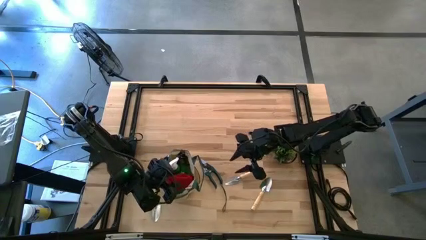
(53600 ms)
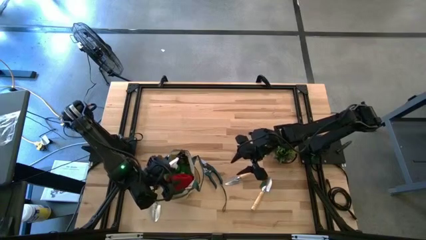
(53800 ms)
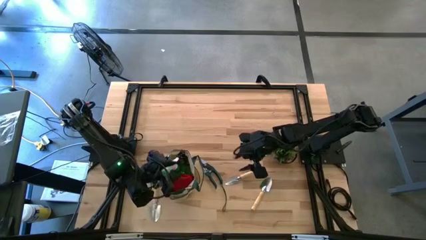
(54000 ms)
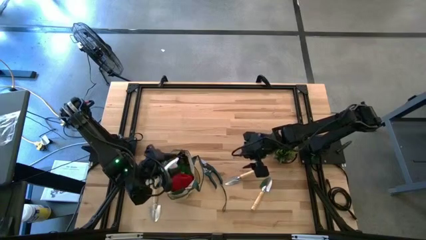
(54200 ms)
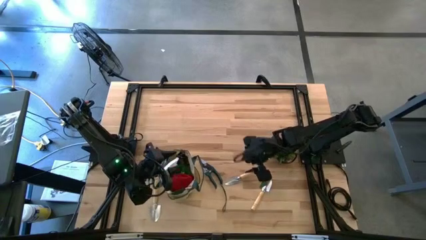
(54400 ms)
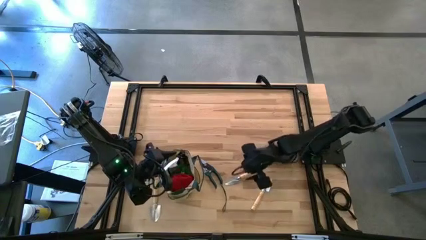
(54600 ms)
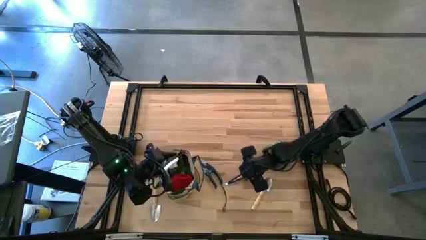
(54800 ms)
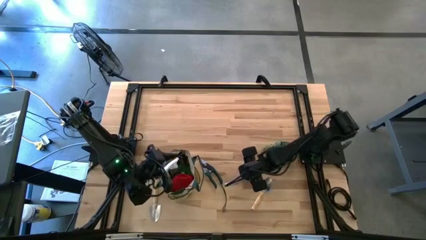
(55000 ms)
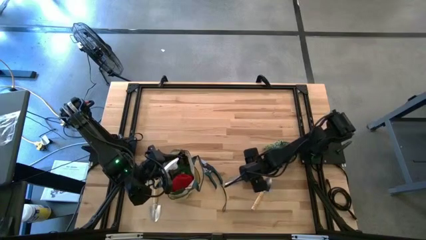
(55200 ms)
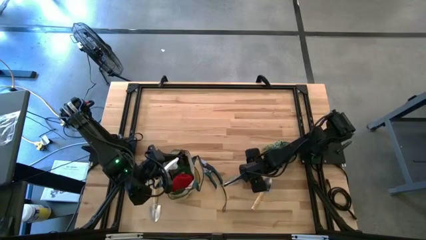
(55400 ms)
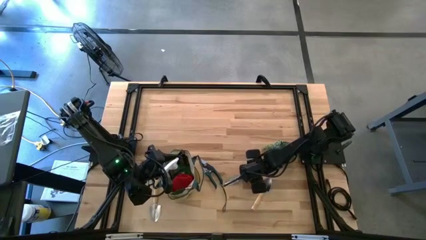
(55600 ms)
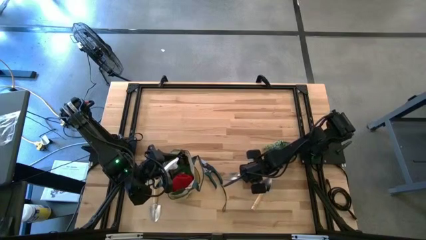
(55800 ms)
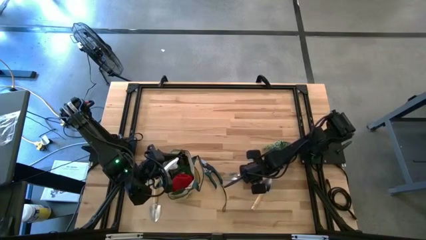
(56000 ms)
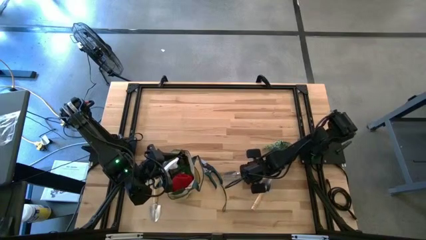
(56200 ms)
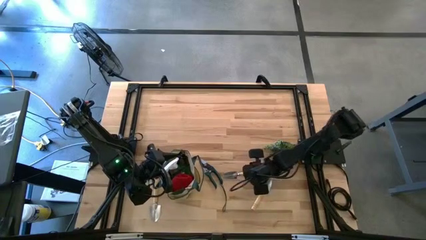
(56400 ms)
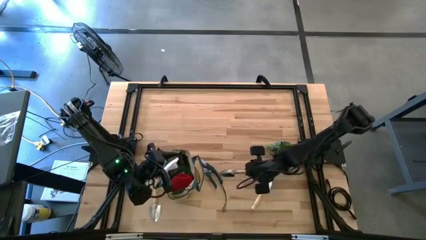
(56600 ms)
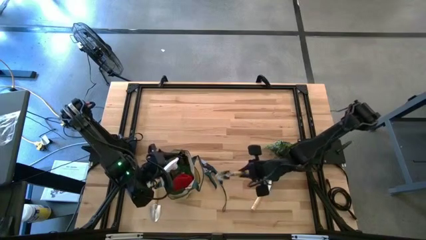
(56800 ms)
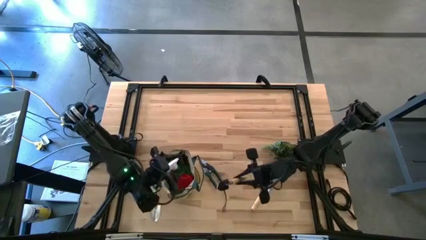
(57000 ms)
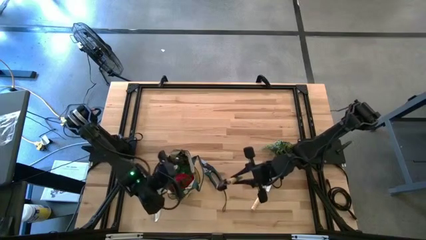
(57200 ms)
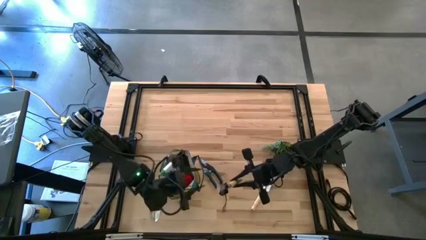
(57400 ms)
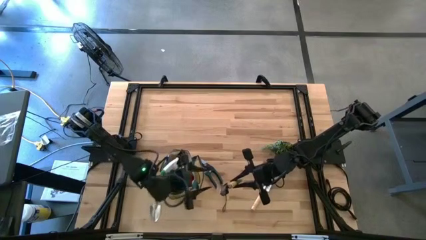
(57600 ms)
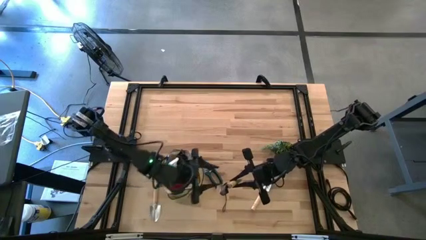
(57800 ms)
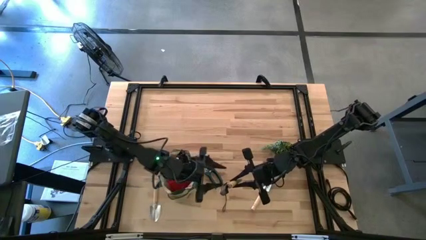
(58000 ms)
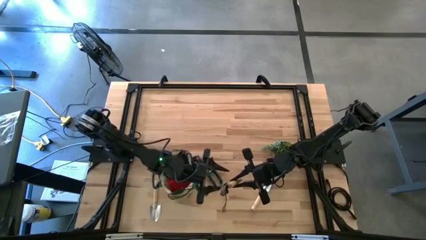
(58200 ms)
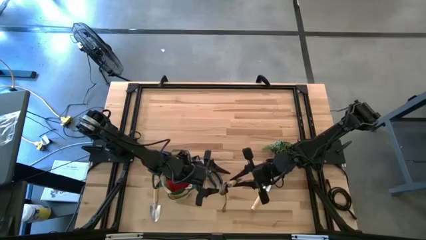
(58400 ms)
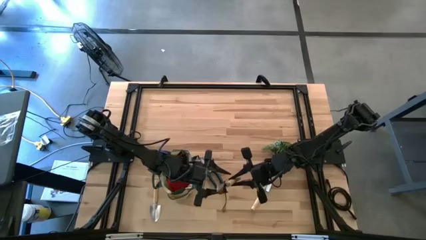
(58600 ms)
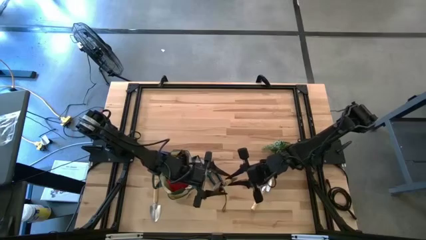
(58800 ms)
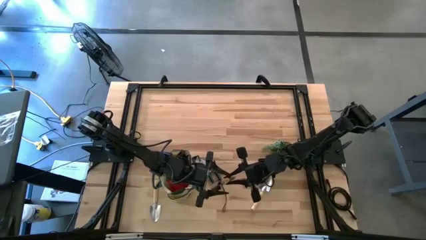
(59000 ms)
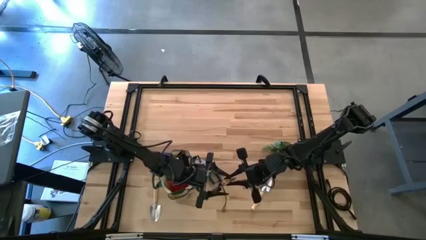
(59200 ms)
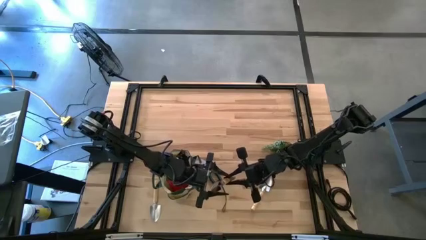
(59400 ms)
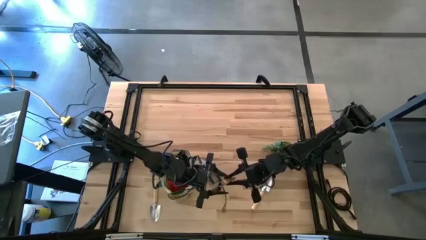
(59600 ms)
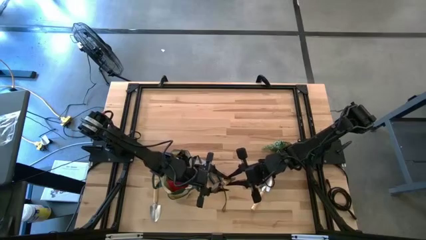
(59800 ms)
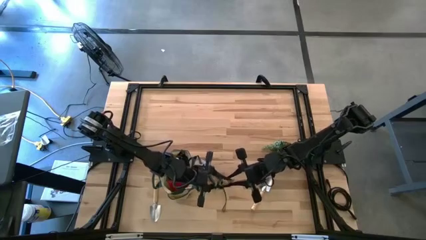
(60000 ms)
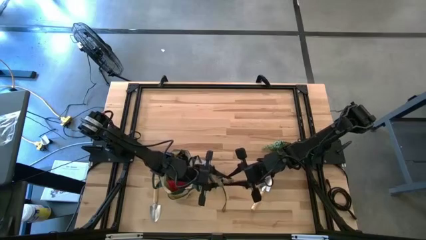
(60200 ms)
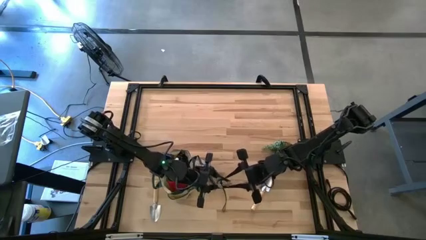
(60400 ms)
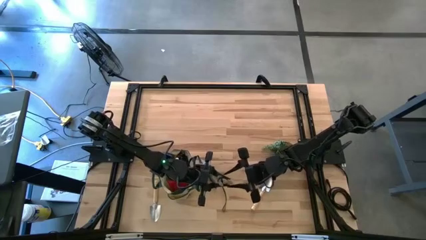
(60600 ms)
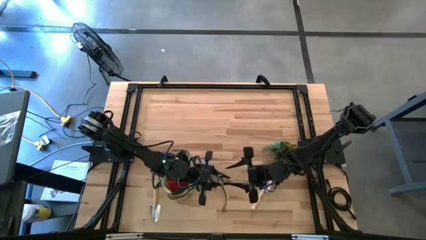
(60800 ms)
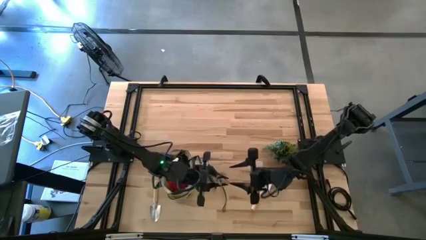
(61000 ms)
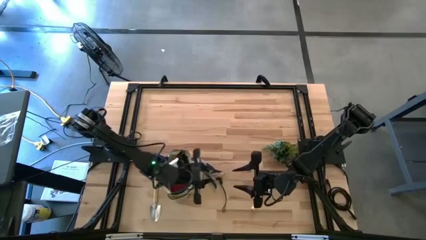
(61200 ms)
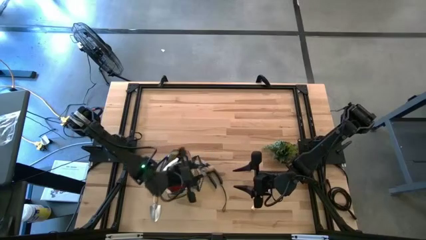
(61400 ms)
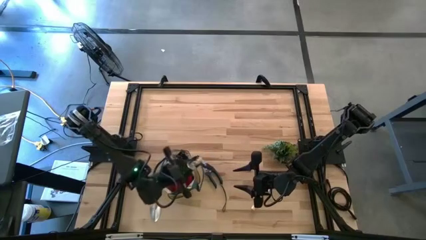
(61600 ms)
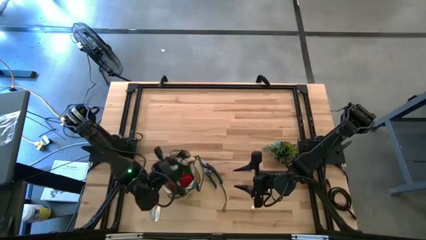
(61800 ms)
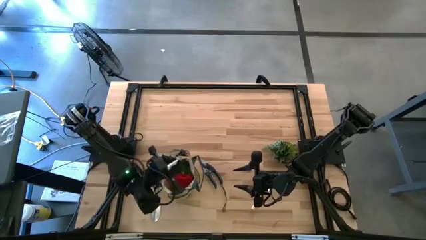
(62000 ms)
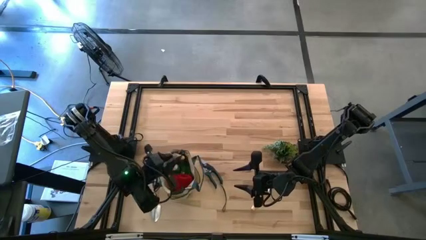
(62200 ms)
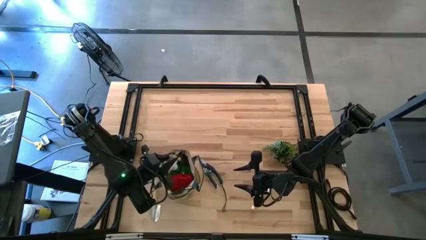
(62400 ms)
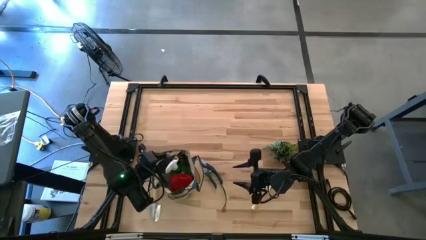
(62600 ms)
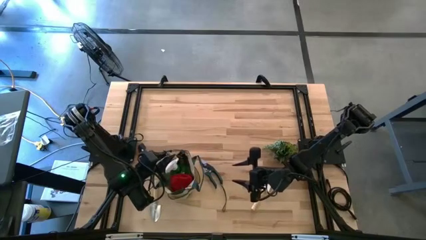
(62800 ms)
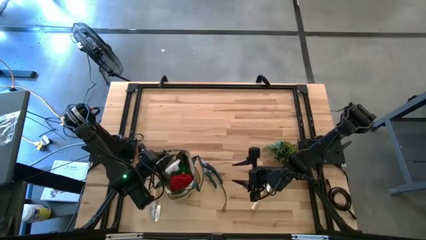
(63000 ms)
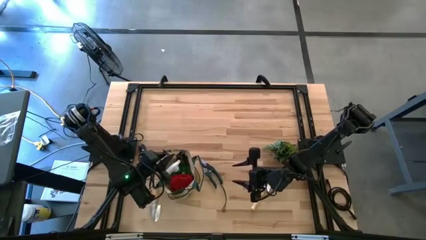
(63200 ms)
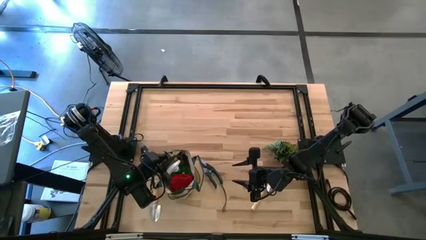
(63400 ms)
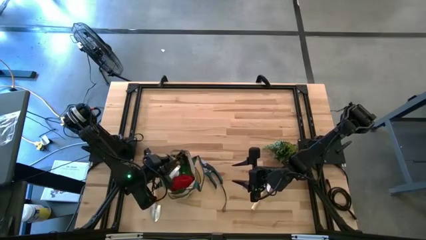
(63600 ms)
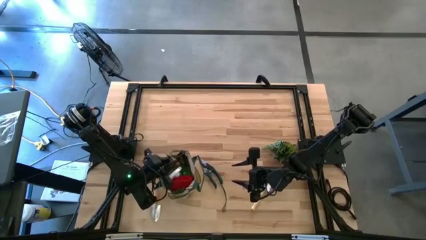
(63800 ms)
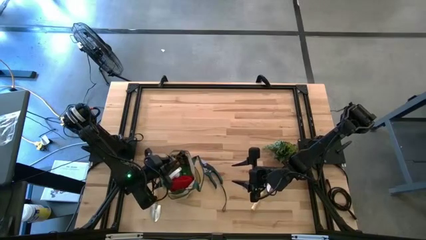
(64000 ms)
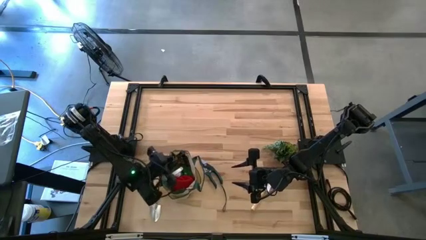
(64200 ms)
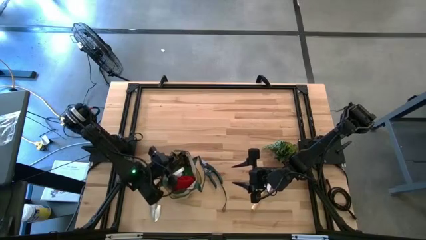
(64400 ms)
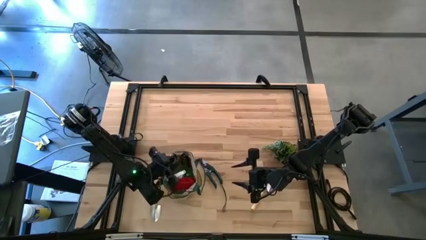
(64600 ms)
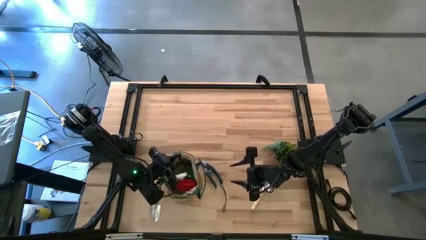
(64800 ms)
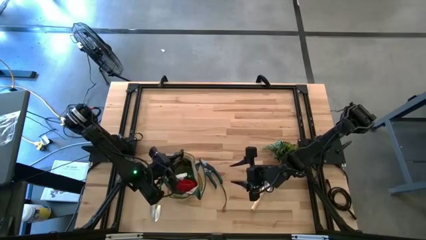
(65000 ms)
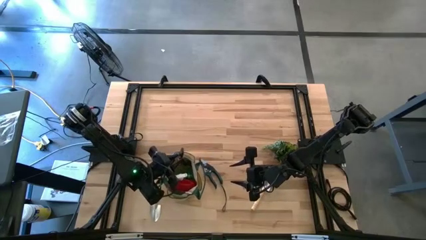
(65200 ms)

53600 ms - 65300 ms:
Task: Pick & Place Garden tools in Gardening bag
Put the middle brown trowel into the brown gardening bag

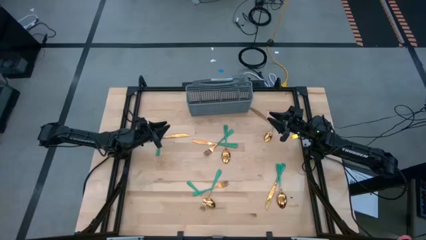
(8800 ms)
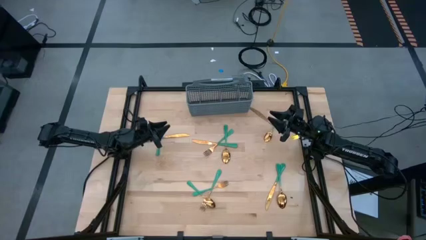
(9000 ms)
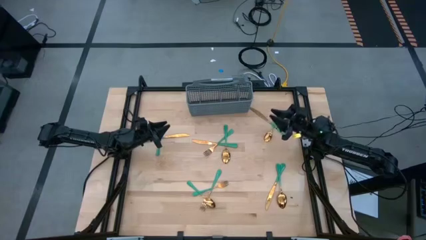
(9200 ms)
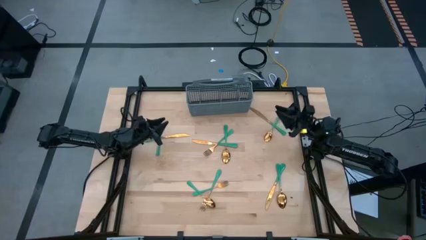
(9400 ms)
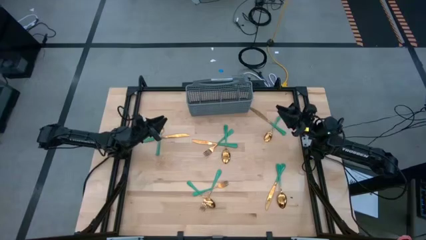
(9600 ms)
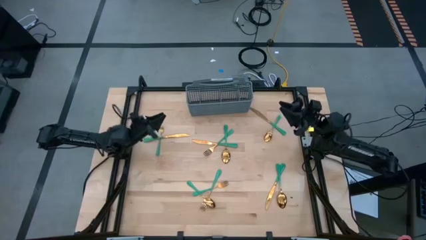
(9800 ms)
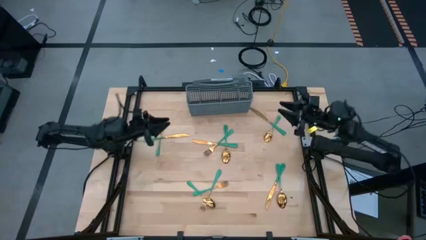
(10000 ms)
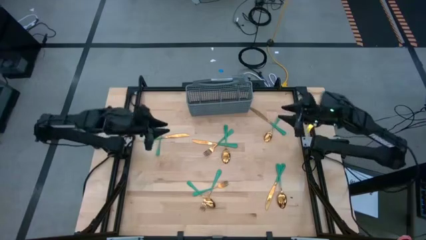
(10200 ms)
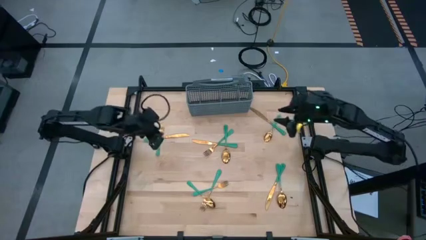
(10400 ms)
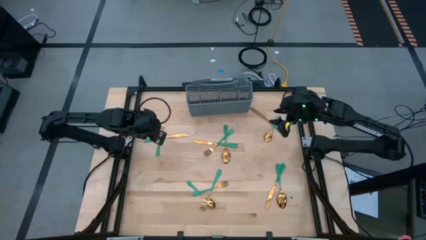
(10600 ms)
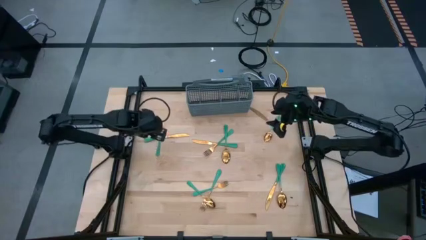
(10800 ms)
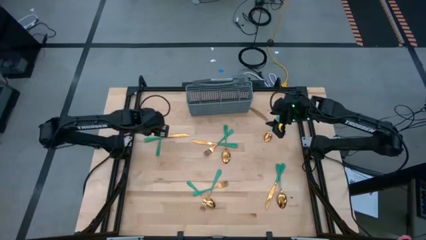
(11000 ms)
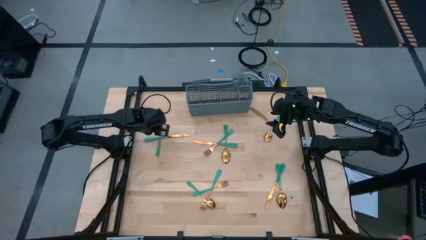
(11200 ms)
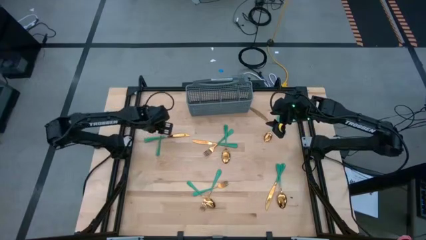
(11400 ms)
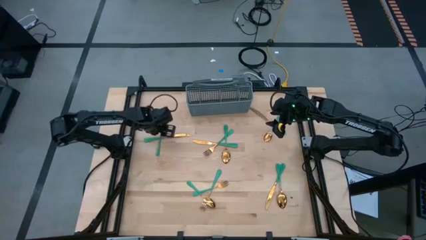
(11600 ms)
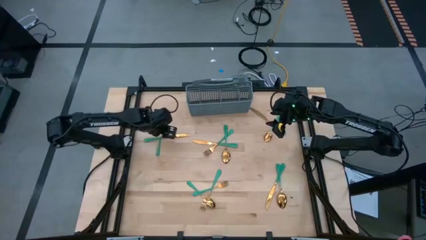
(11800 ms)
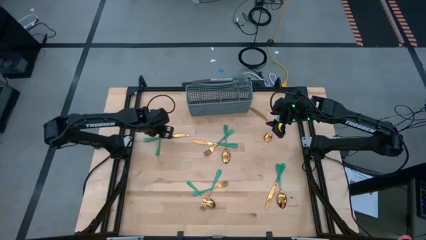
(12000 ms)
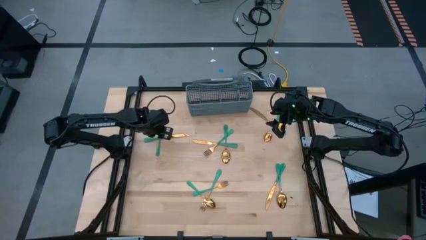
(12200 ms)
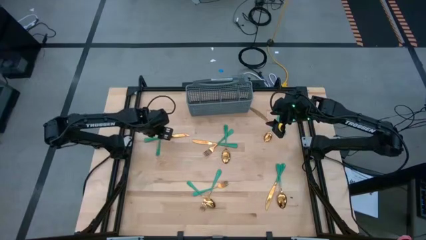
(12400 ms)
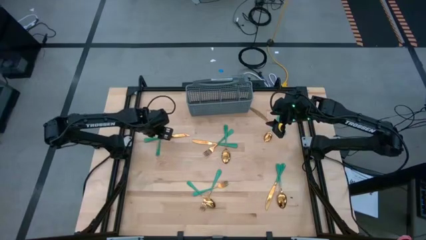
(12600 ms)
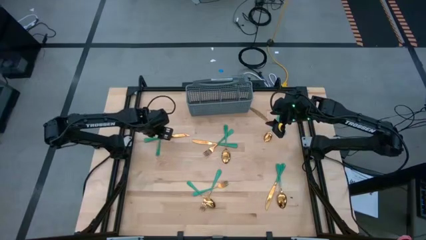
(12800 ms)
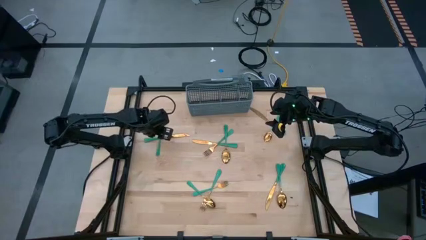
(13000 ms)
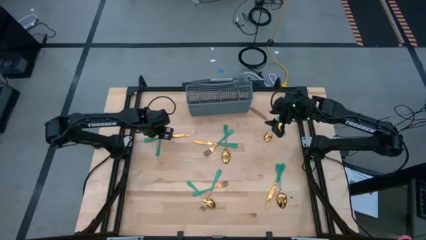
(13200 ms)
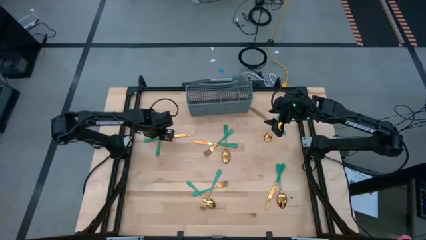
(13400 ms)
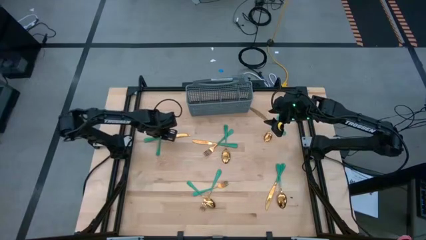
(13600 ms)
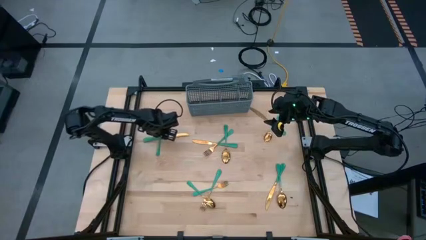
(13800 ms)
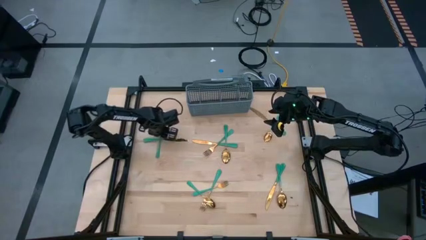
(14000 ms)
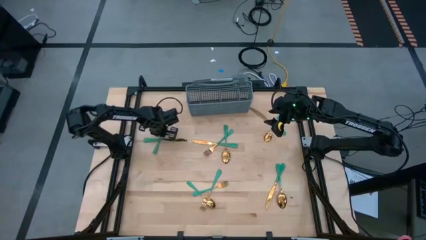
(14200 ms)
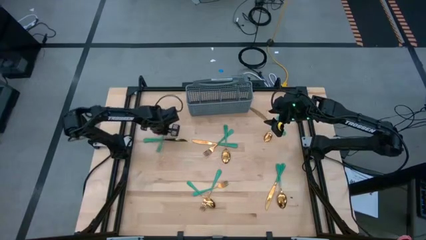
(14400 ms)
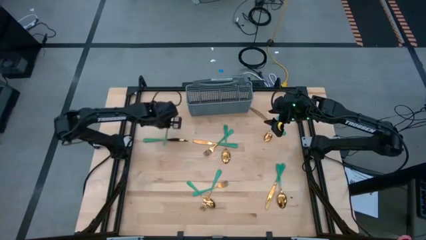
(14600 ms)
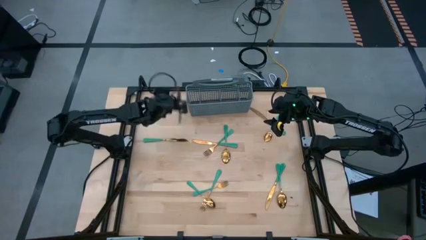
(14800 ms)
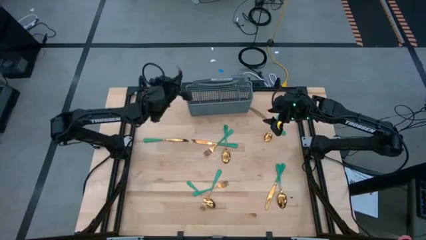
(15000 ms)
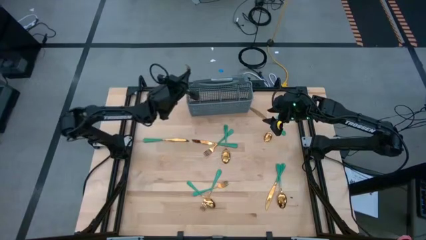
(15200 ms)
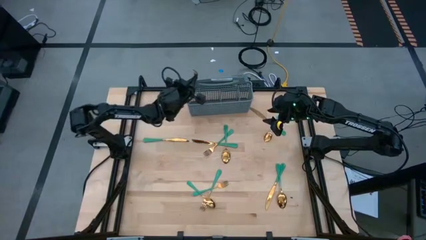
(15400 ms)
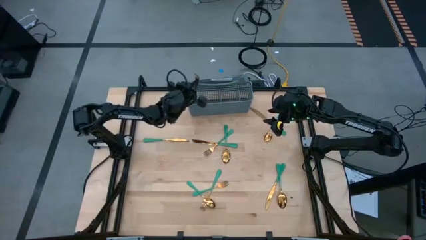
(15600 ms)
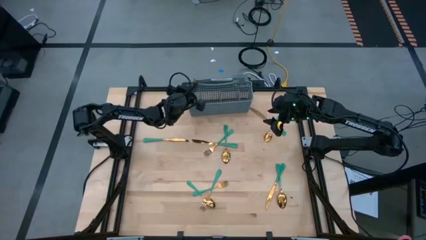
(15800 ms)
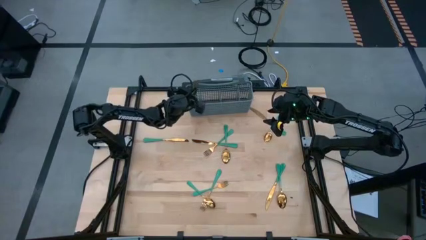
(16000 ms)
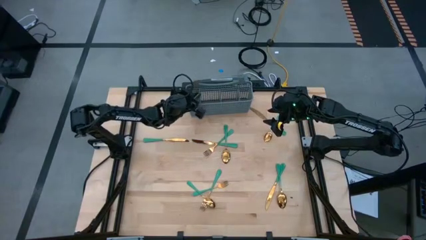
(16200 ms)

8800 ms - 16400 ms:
Task: Sort silverware
Put the gold fork into the left section of the gray utensil holder
